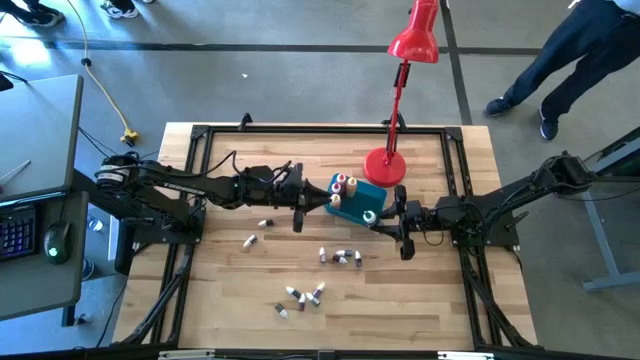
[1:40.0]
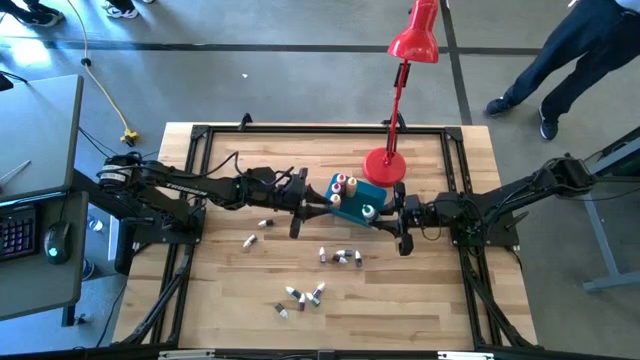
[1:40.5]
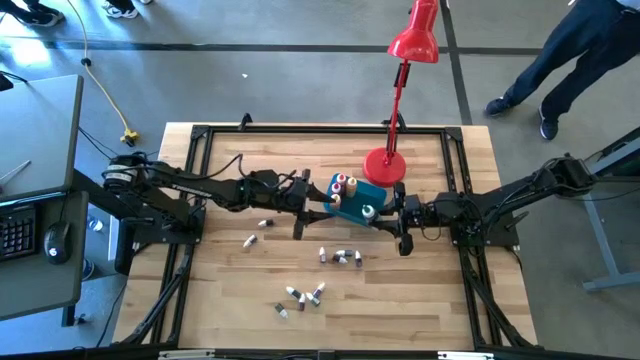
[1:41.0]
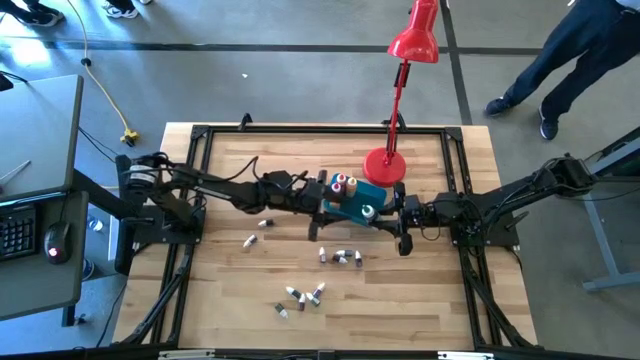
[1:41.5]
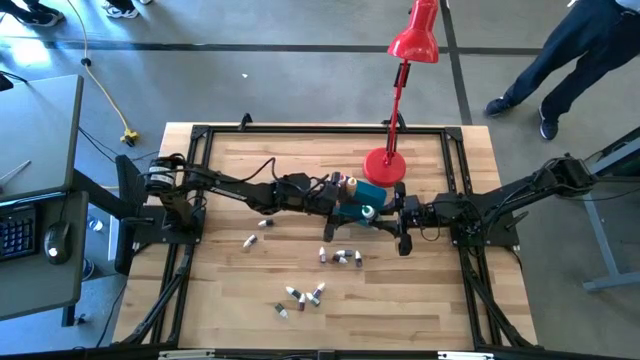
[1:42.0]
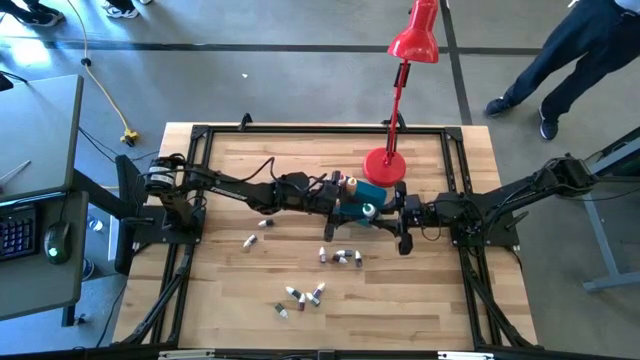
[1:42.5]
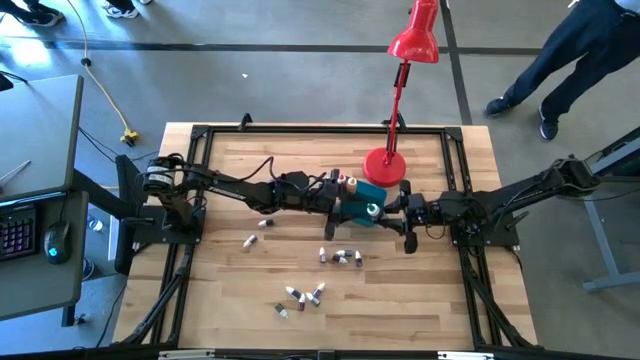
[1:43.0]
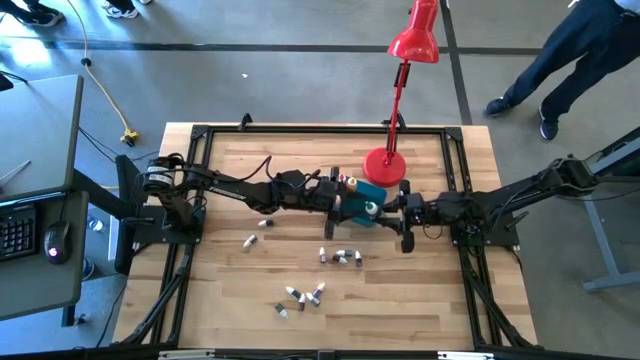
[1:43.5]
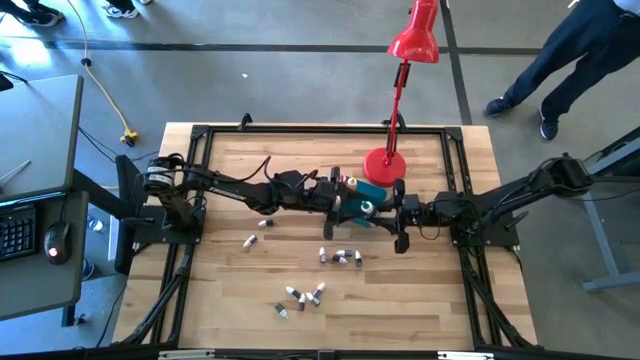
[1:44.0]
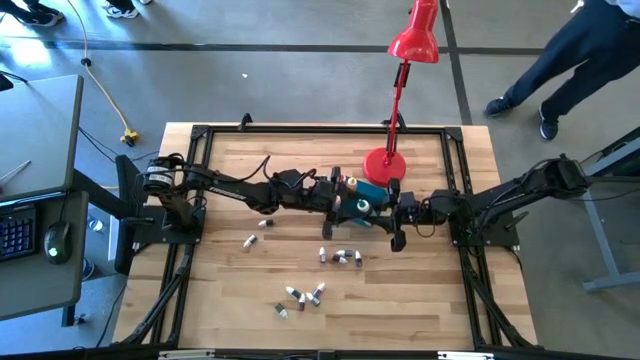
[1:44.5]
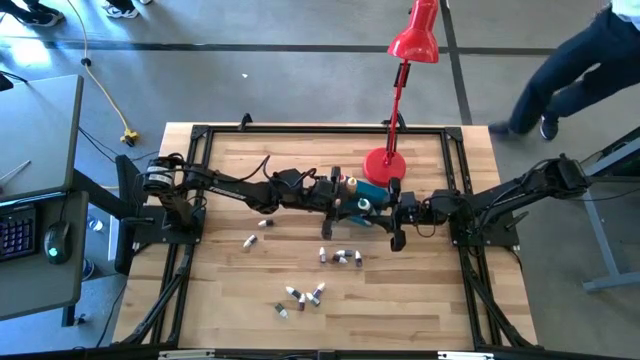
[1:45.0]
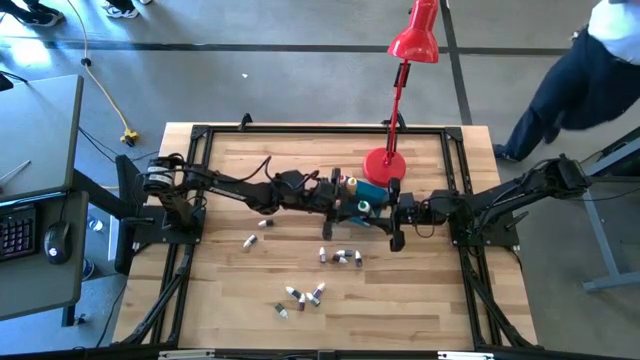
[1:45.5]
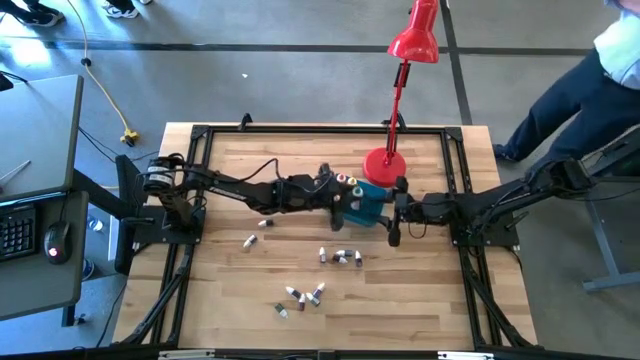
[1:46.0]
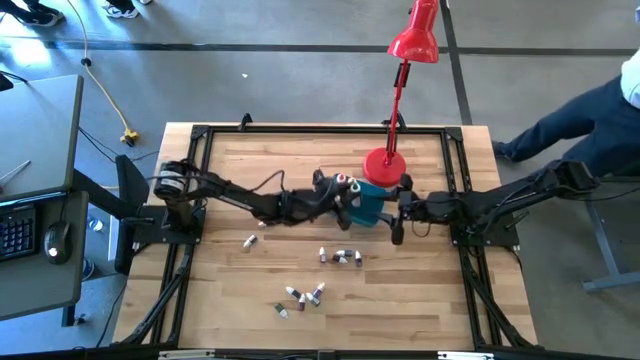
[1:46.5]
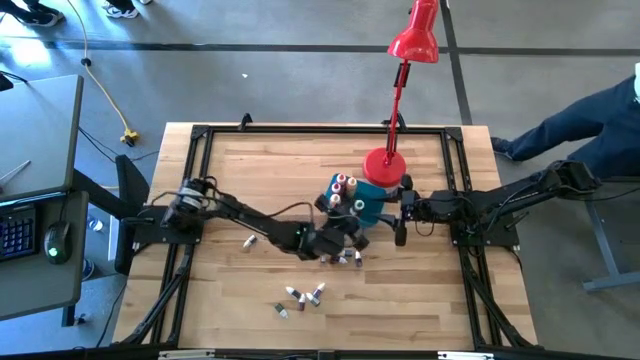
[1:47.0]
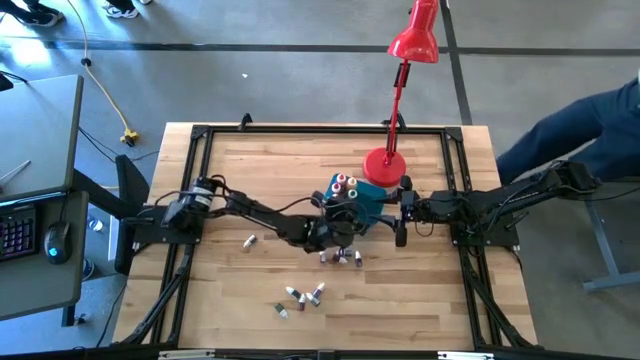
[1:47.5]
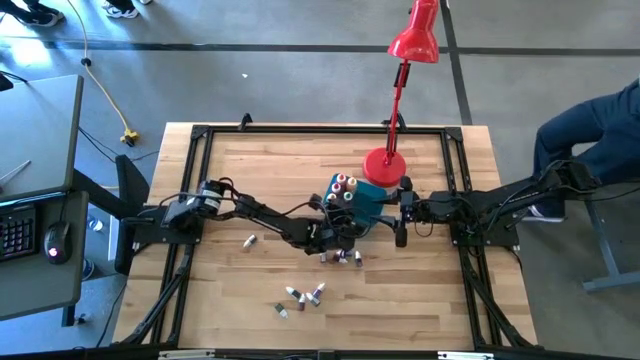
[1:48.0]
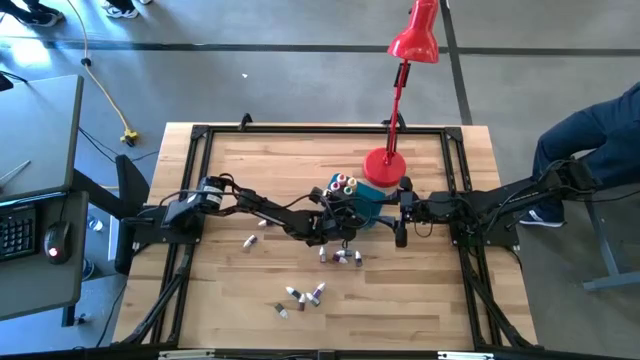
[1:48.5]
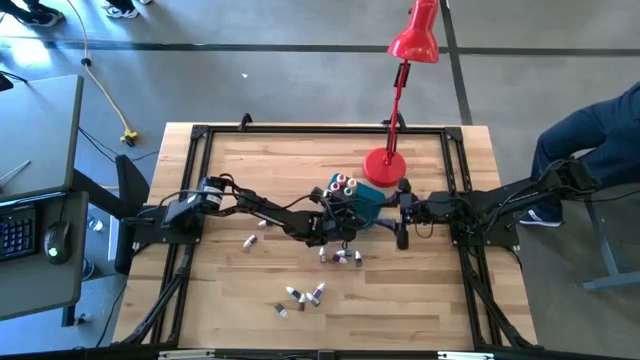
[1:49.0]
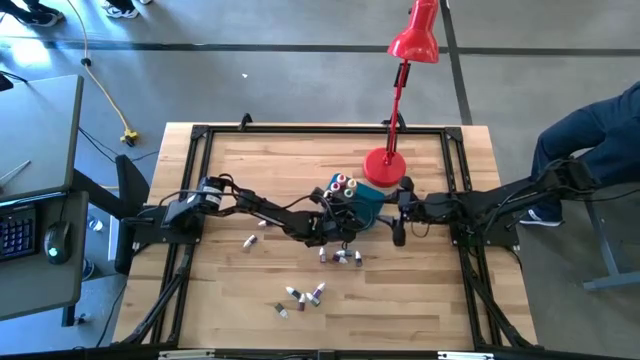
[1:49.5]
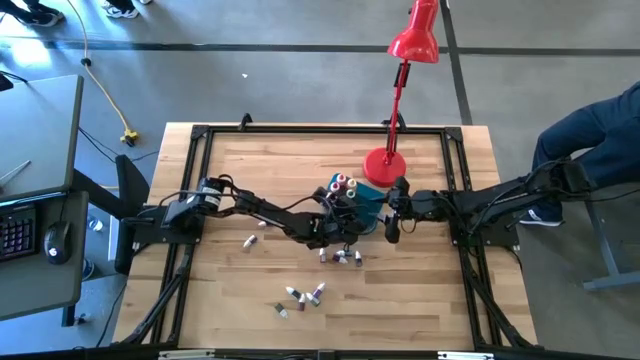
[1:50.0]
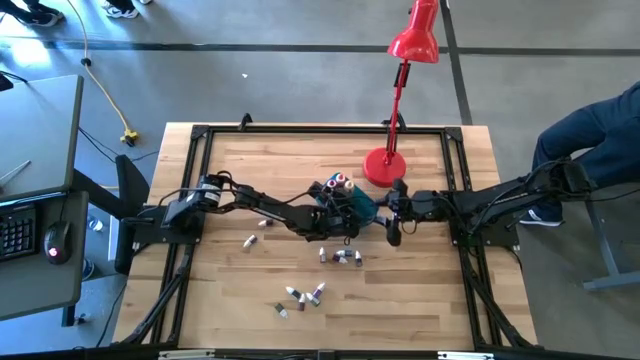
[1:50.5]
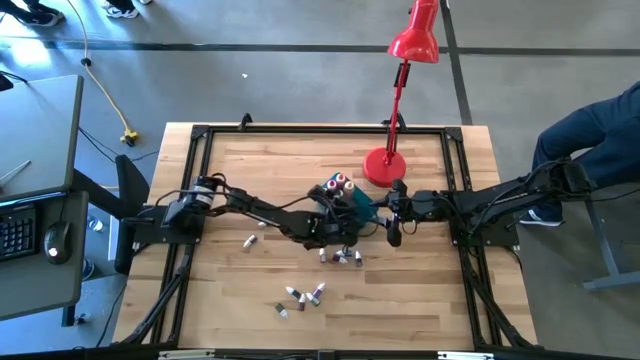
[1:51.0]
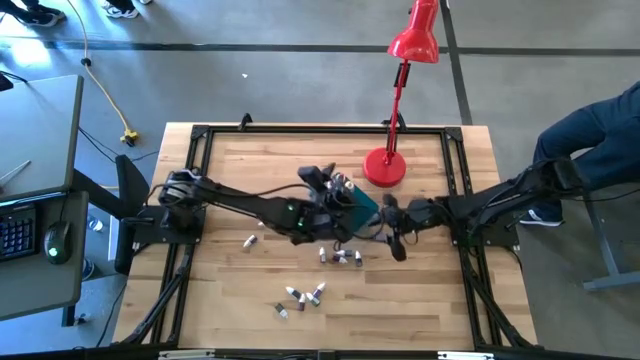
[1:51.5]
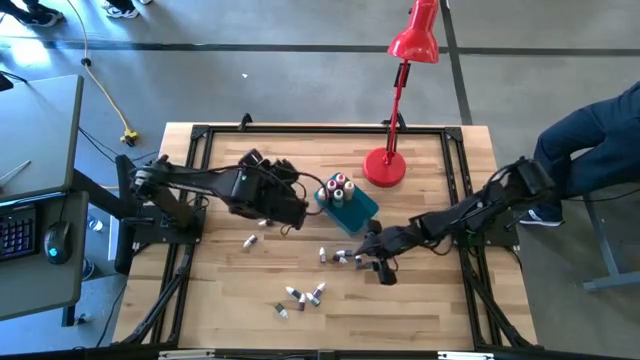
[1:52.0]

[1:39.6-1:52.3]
Task: Pick & Place food coloring
Put the big green food coloring bottle into the blue container

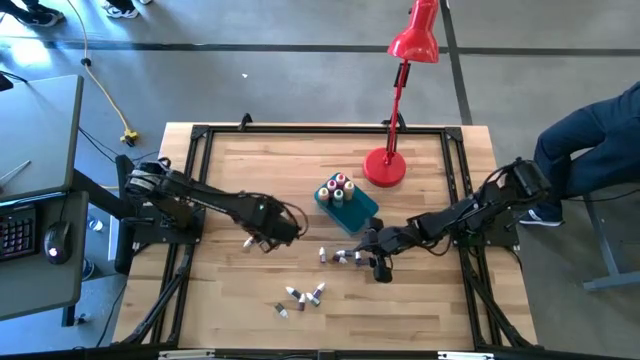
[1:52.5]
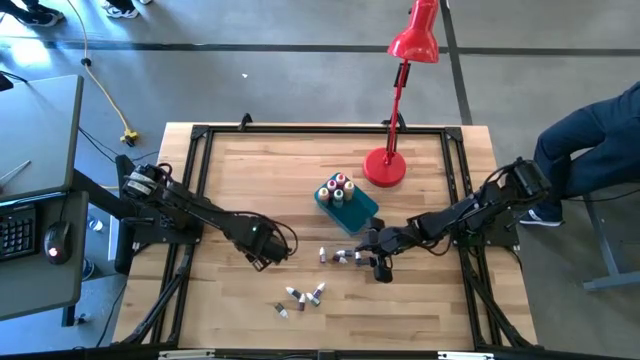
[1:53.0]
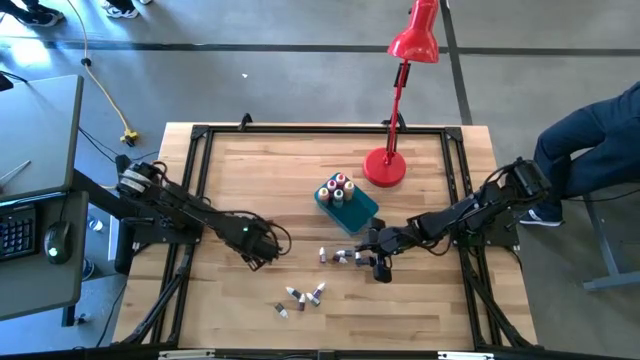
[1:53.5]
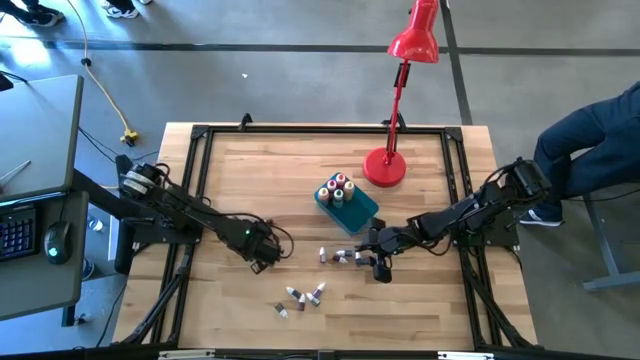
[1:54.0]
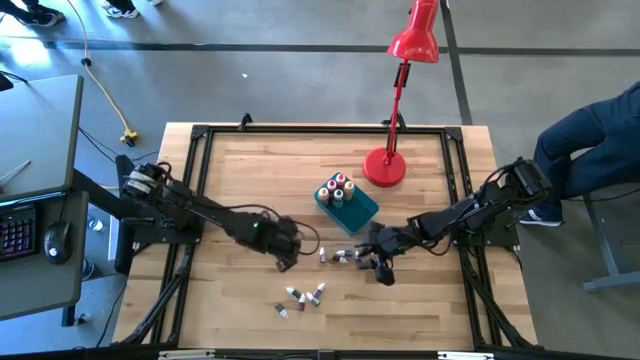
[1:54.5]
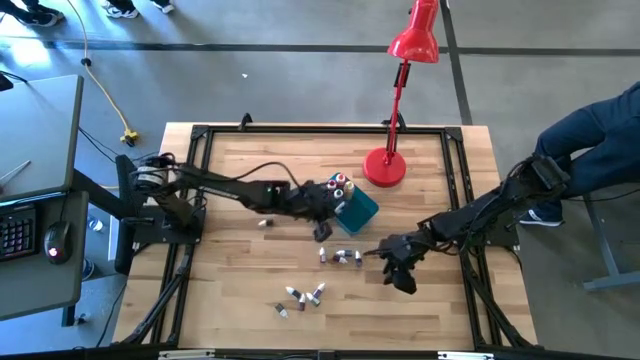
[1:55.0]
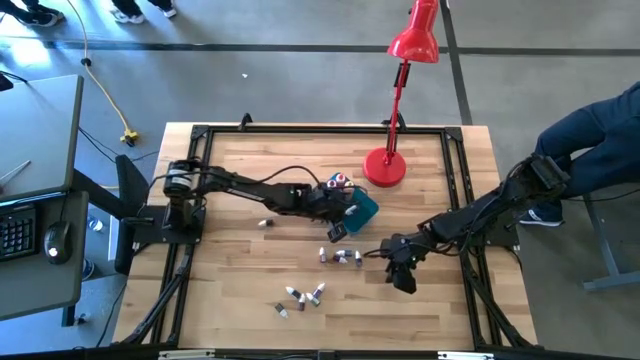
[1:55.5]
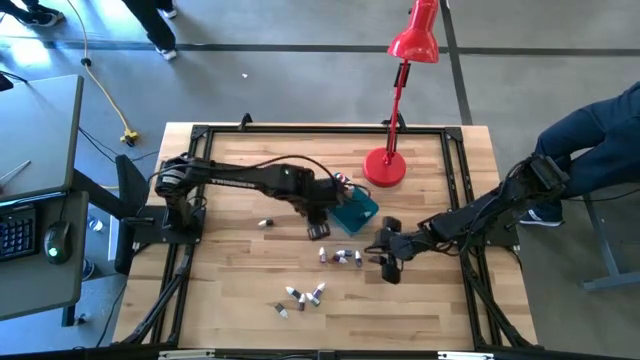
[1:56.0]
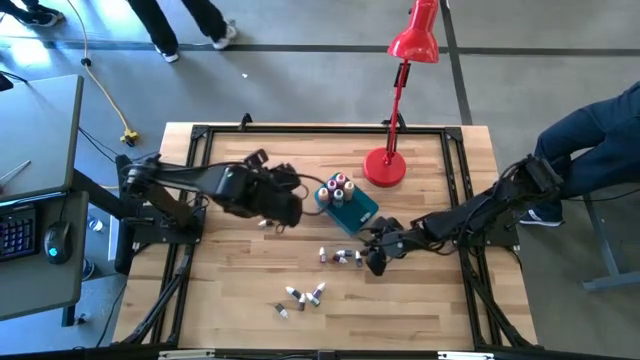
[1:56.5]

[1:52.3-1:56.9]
Put the small food coloring bottle into the blue container

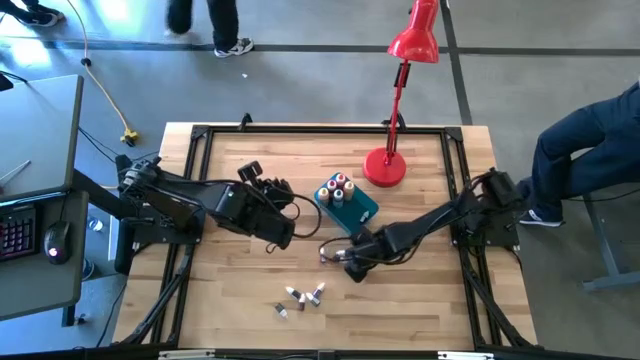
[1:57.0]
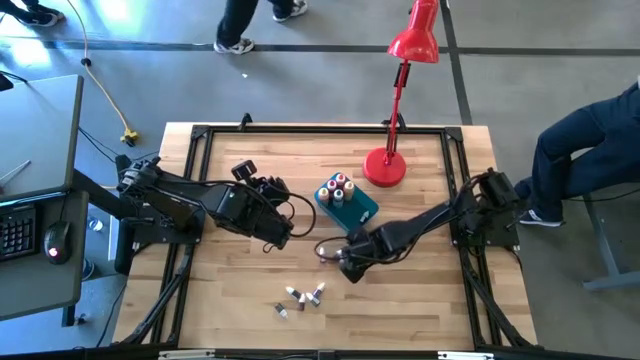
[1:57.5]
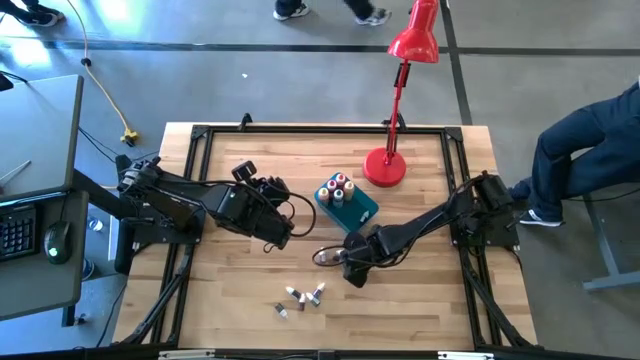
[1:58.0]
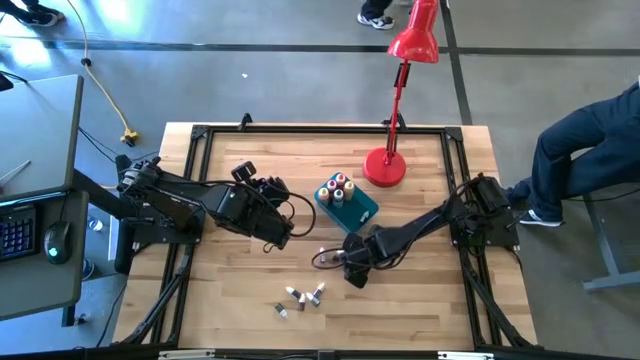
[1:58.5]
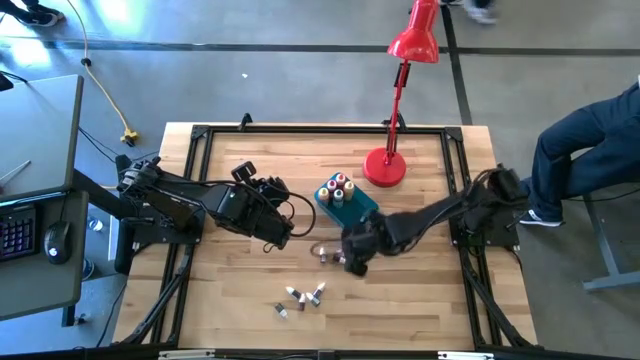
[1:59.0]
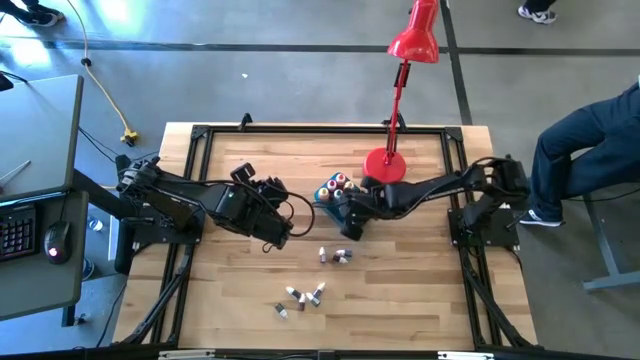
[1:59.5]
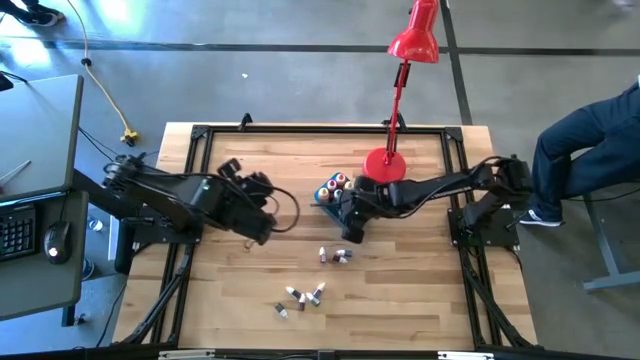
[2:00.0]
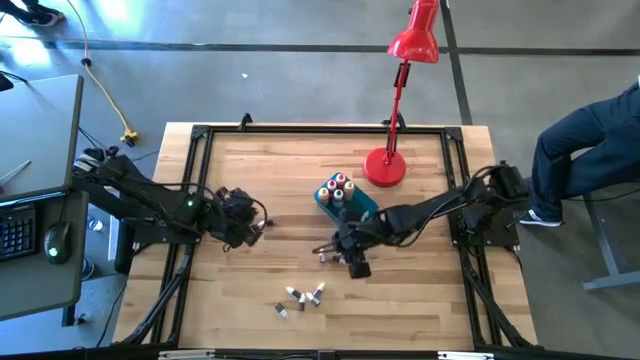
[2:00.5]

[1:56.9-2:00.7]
Put the small food coloring bottle into the blue container

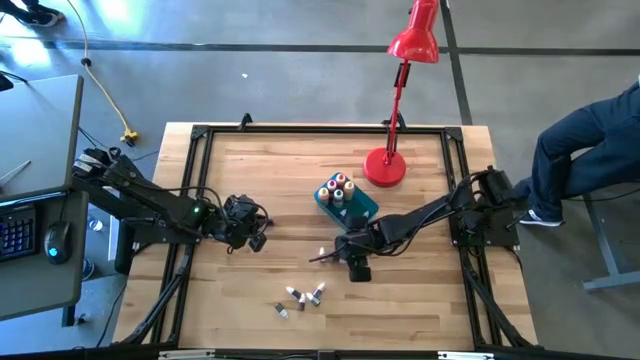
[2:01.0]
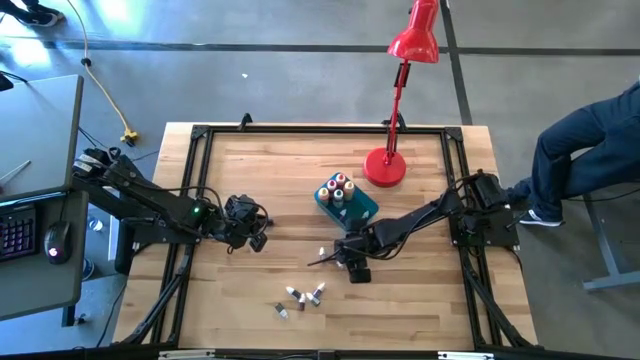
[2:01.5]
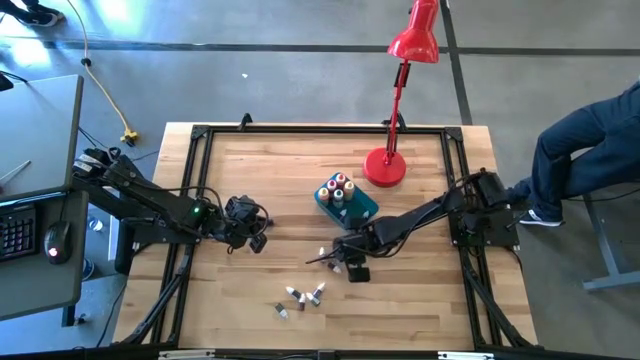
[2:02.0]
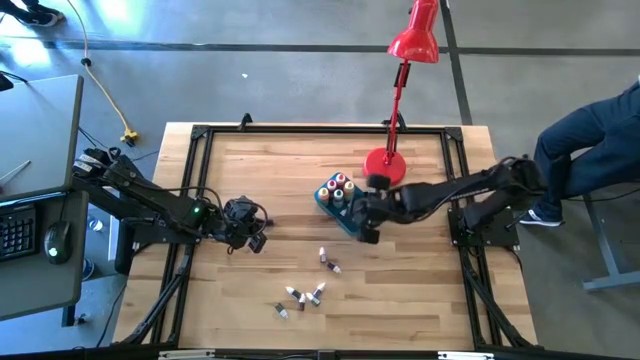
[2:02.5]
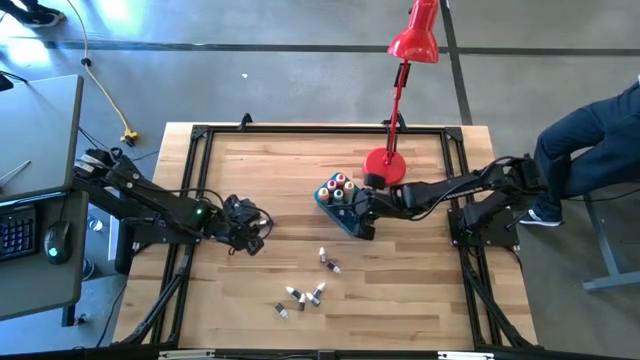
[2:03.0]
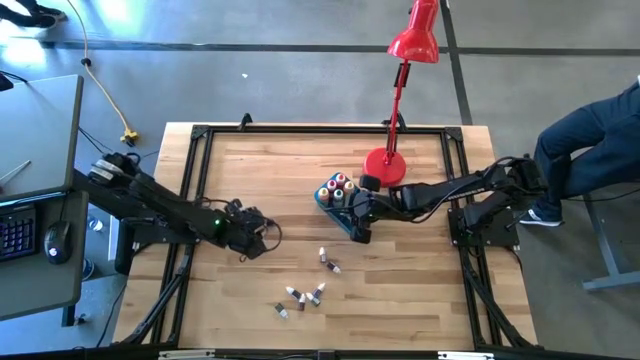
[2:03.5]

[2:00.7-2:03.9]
Put the small food coloring bottle into the blue container
